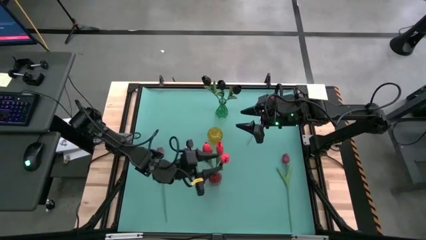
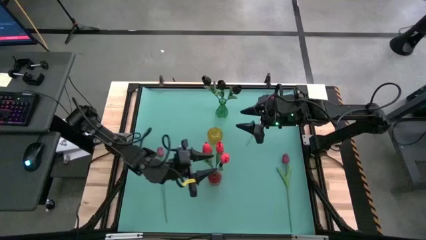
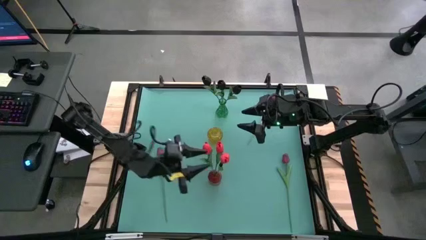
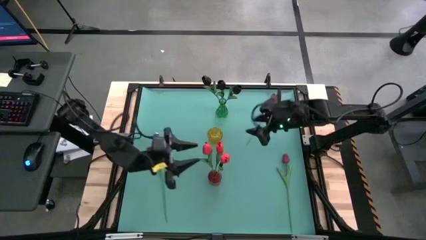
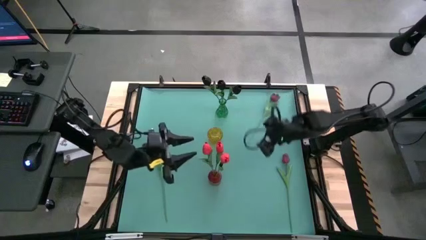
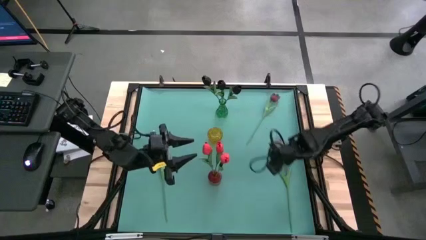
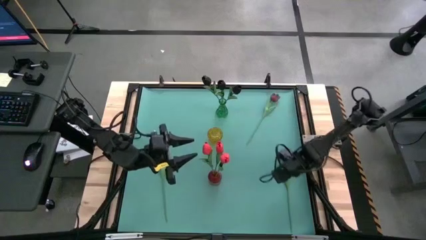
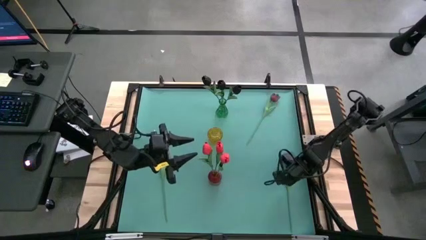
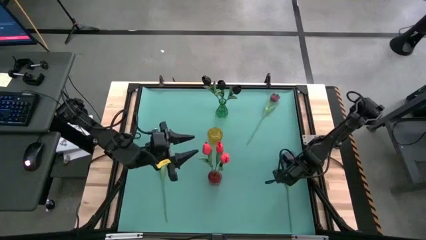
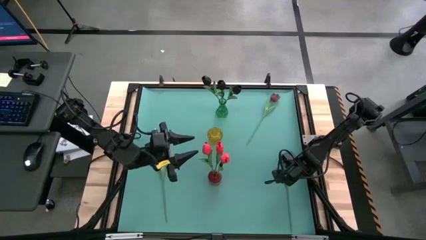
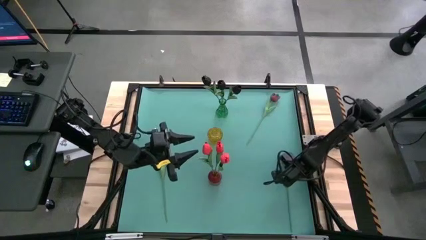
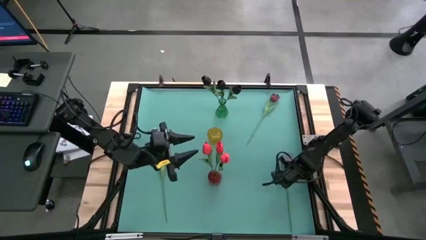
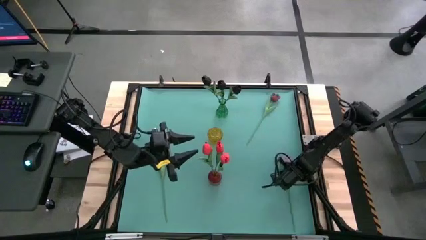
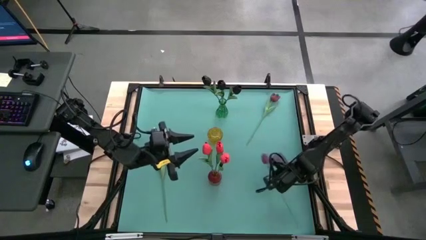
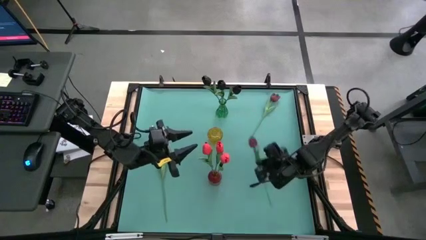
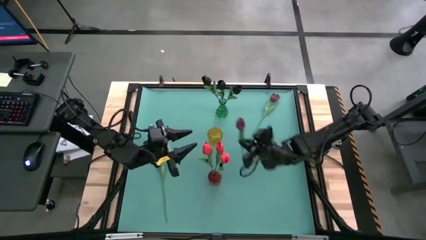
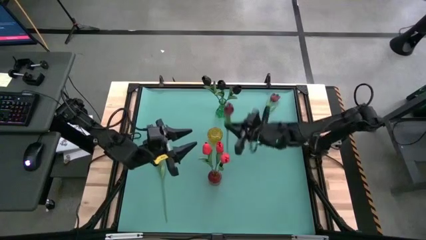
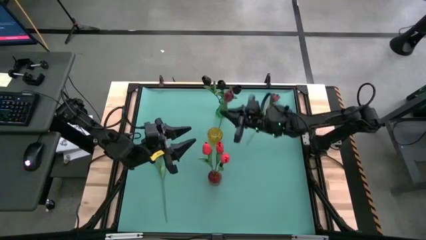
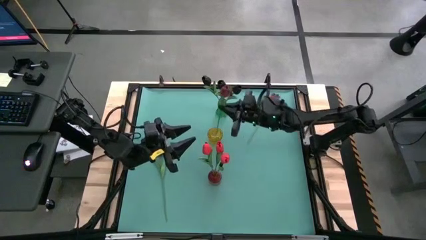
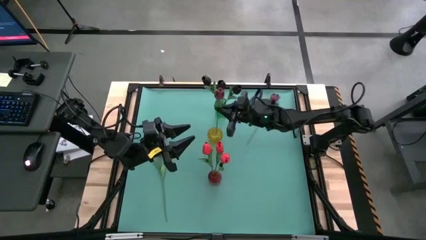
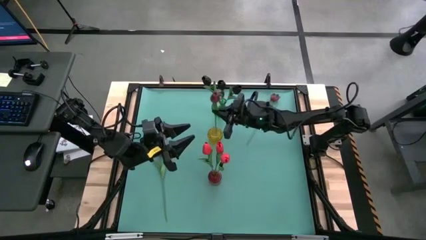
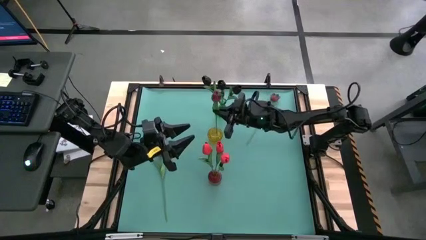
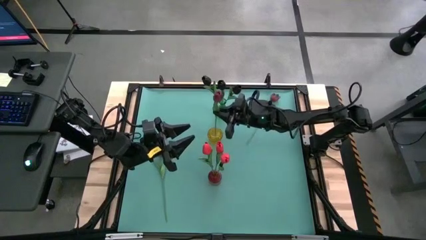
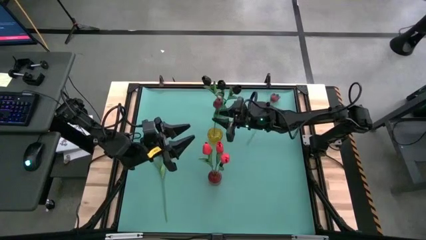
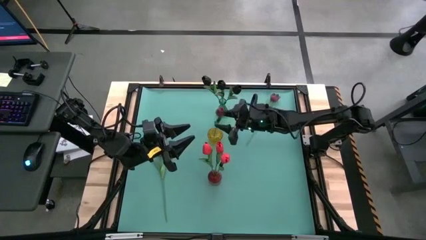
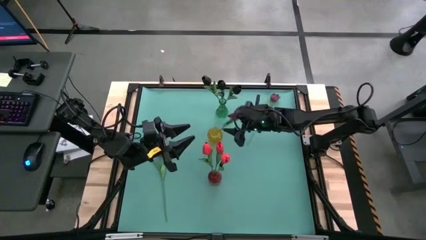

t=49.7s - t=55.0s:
Task: Sort flowers into vase by color
Put the bottom right dark red tulip into the yellow vase

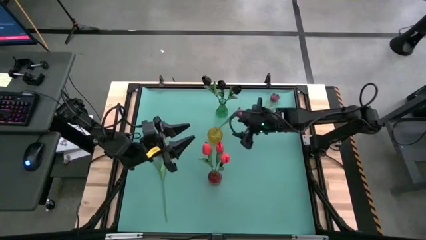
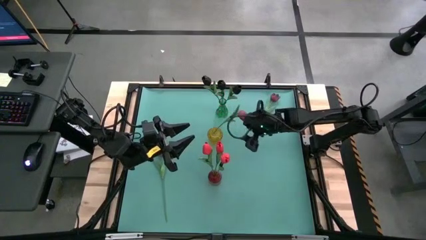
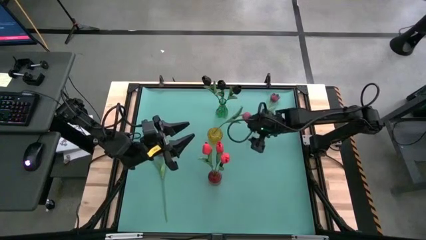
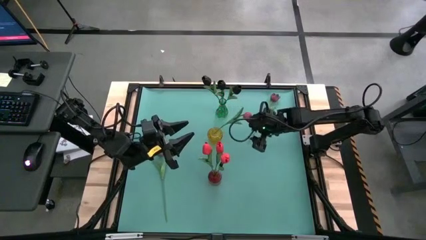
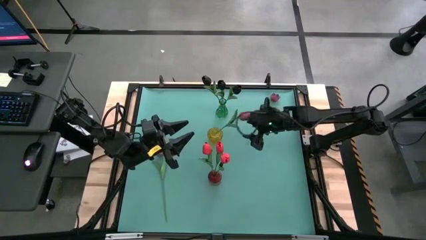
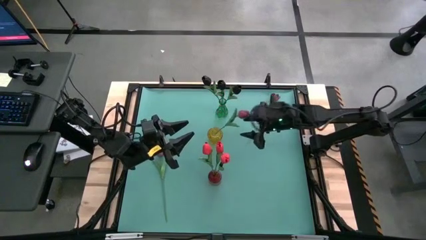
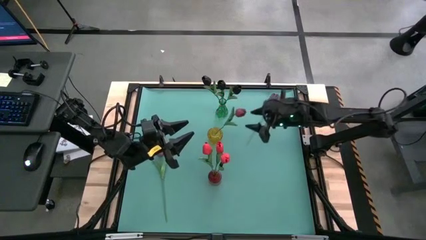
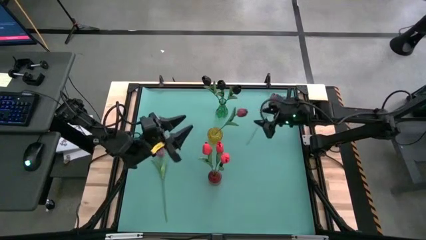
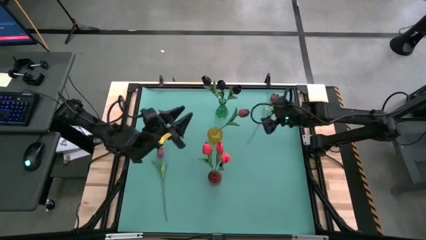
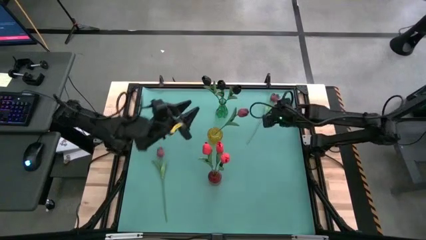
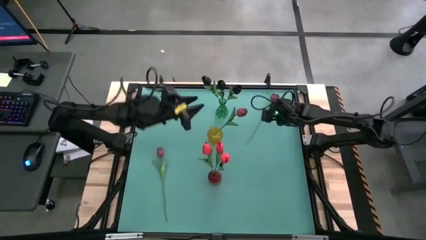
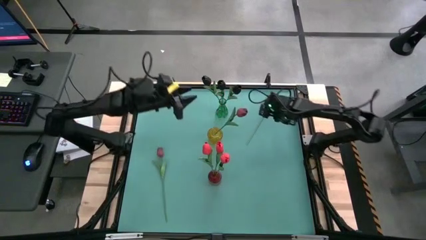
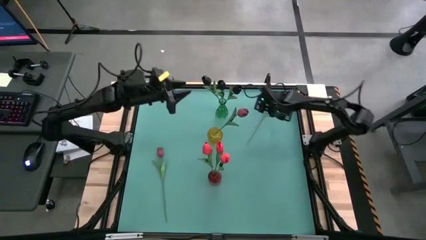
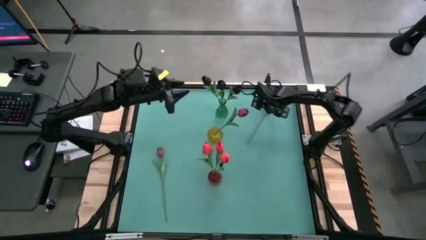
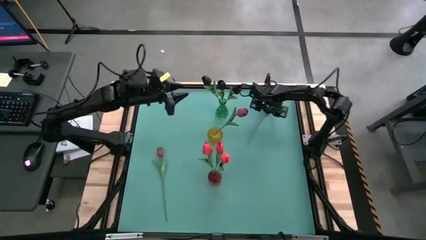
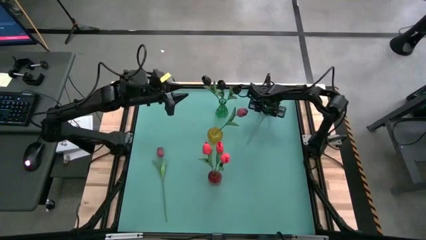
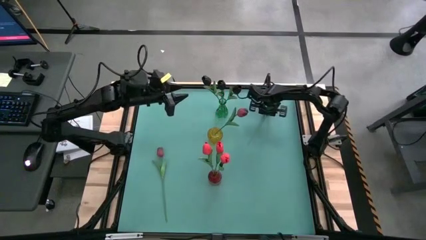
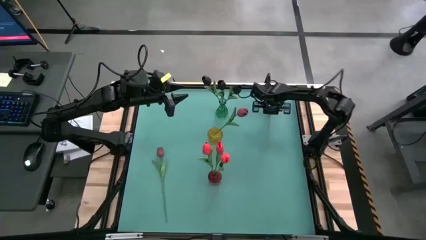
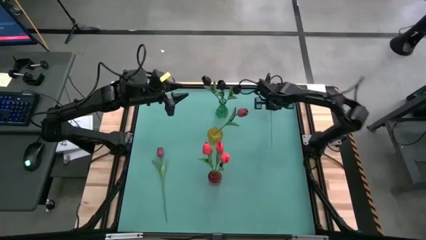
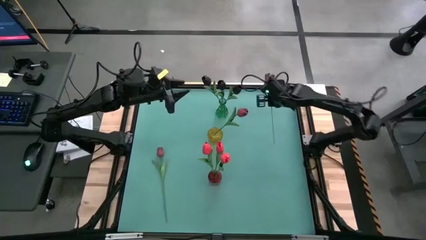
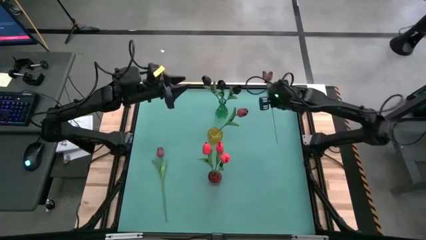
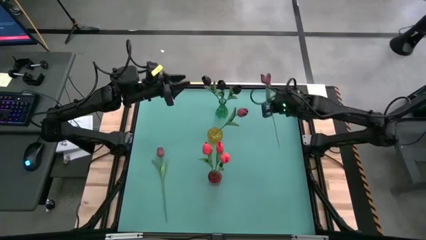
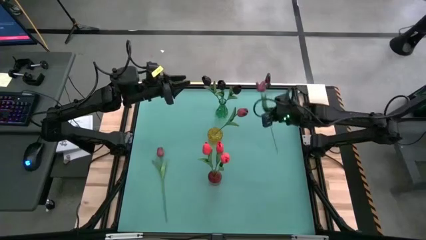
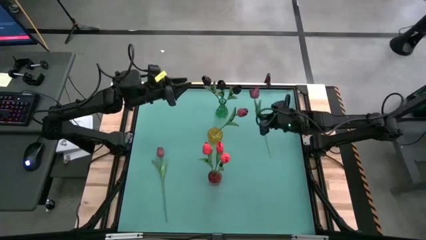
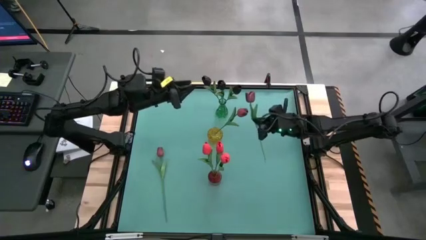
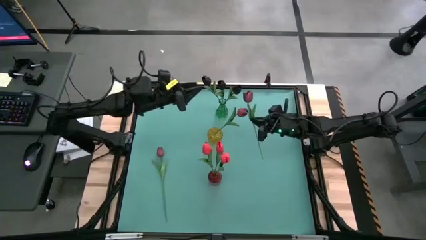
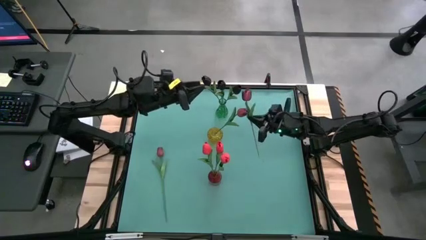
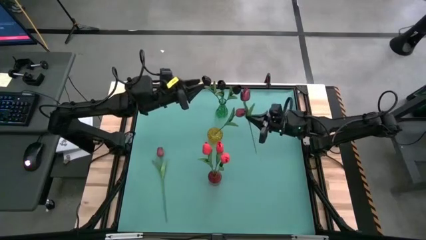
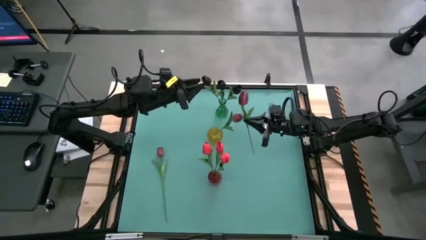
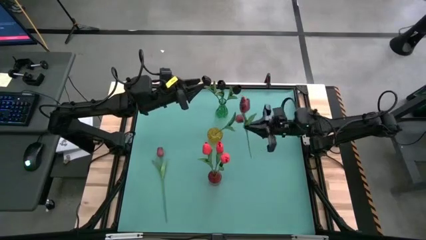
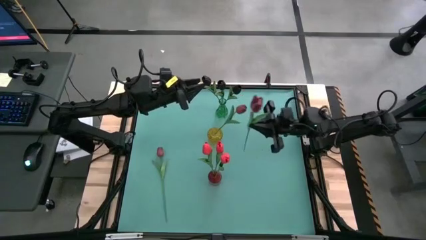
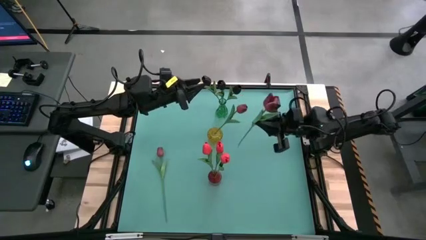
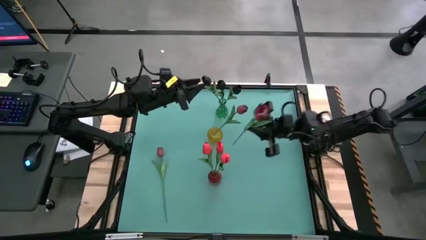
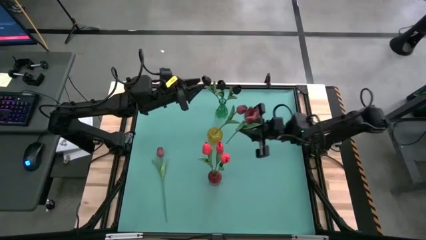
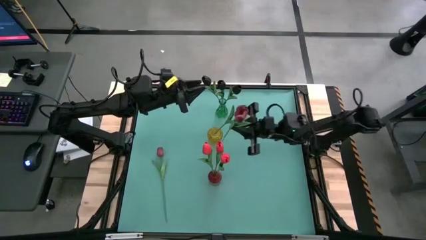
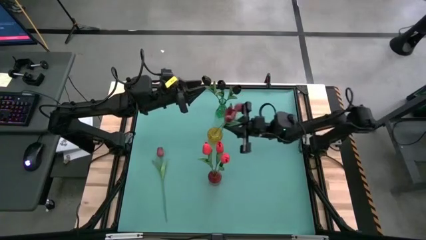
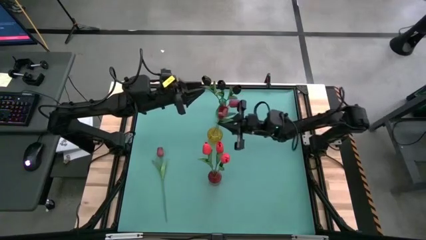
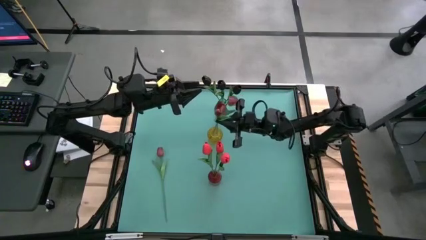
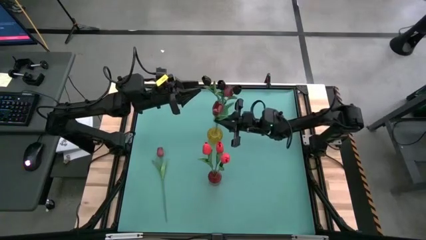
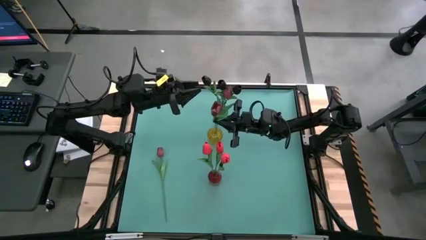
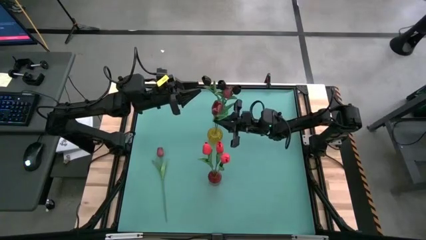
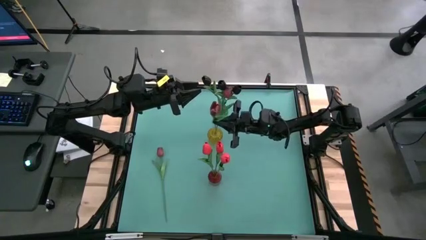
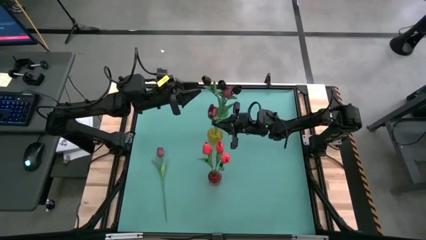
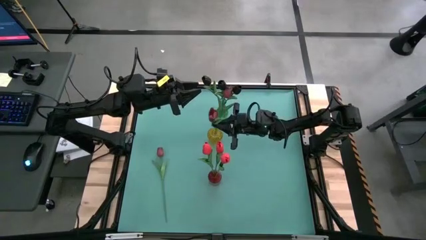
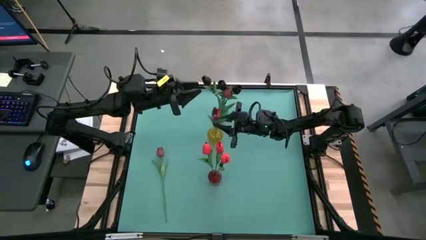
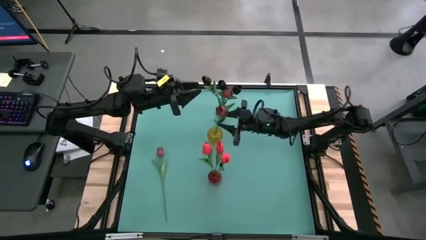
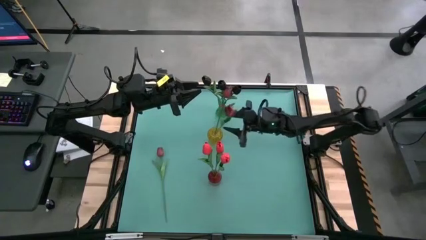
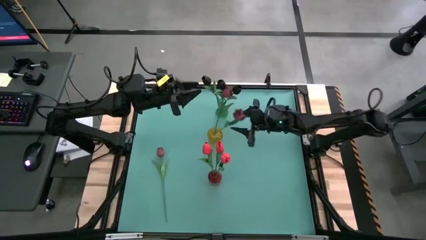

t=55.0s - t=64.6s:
Put the top dark red tulip into the yellow vase

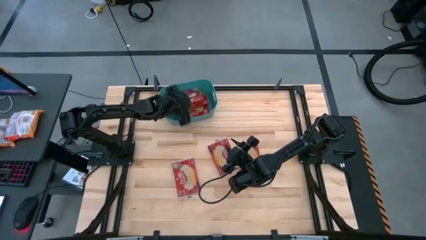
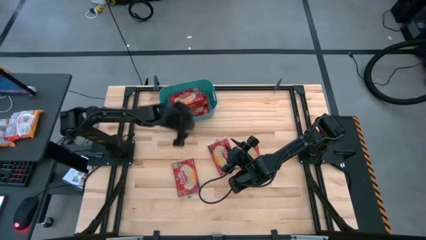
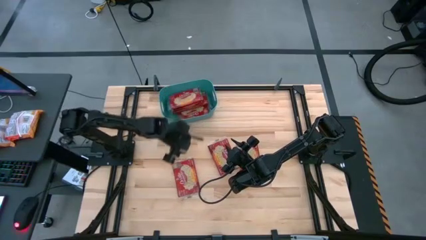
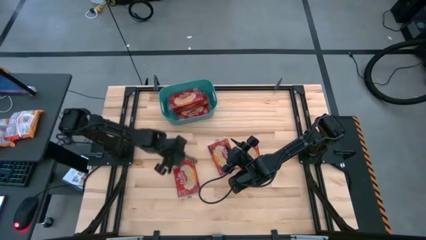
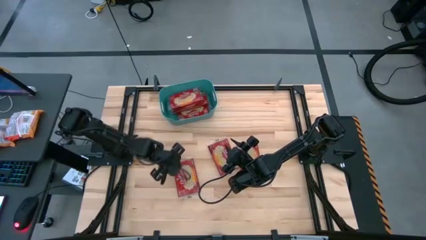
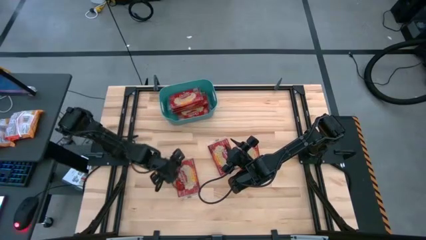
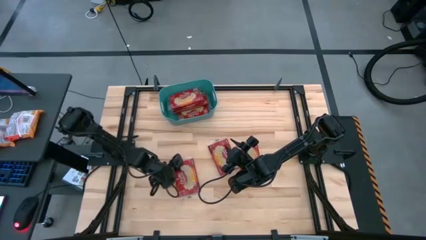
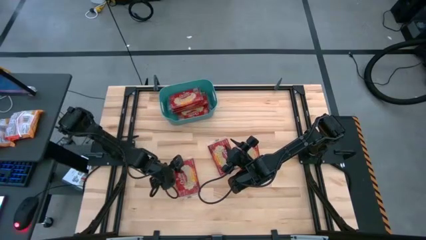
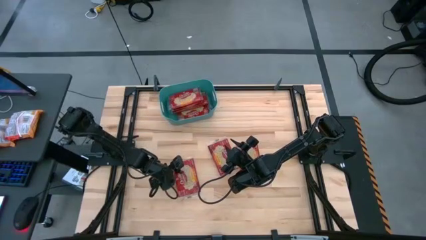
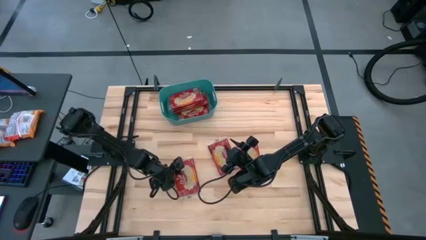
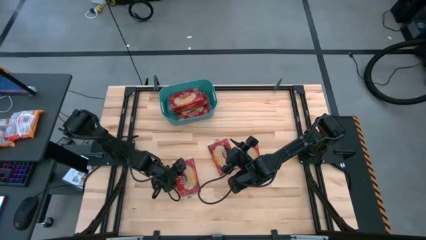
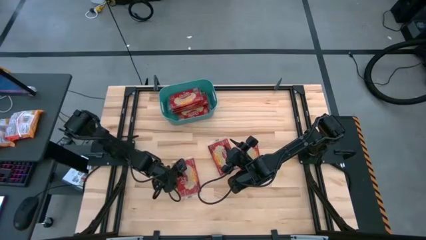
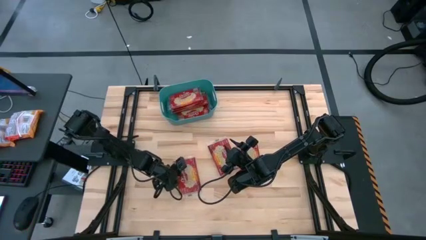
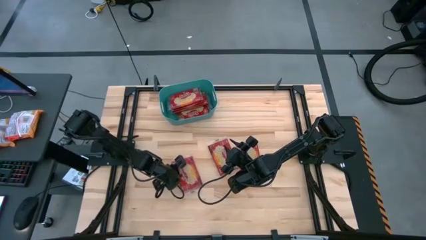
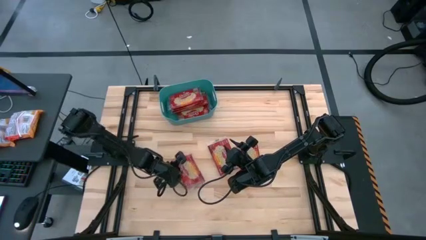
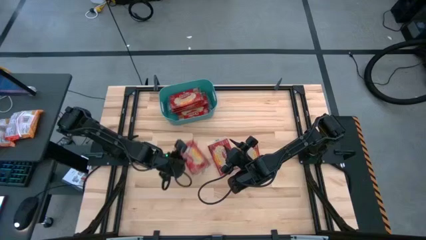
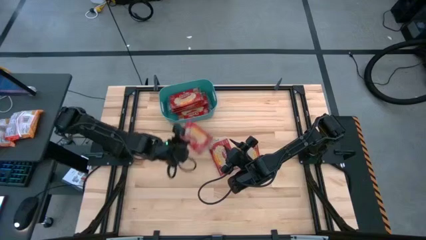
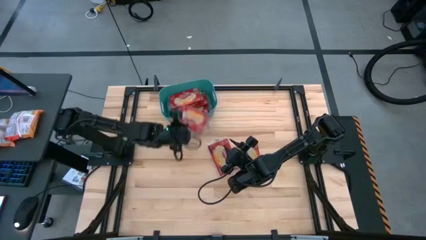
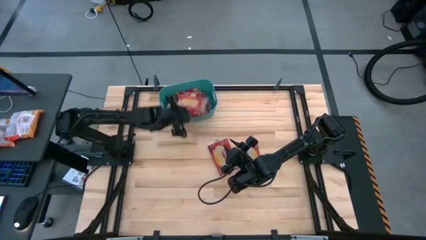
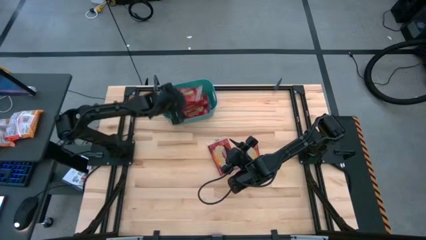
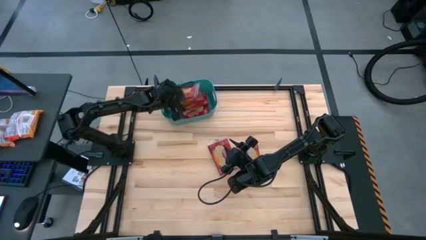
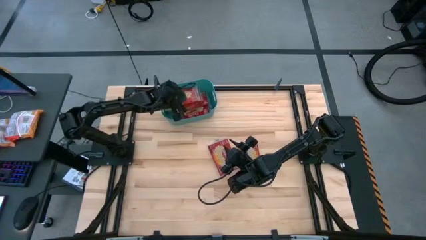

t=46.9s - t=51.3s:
Task: Sort popcorn bags into baskets
Put the red popcorn bag into the blue container
